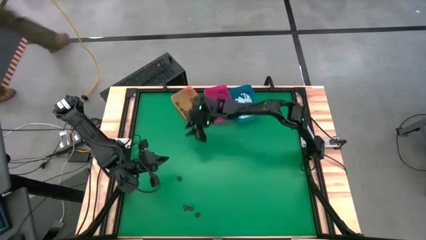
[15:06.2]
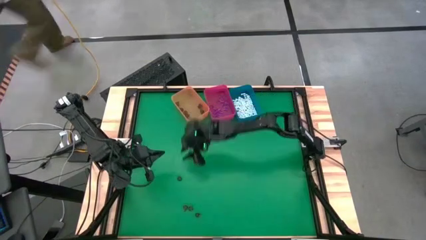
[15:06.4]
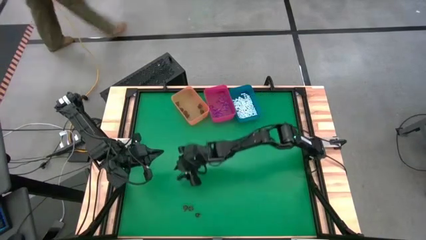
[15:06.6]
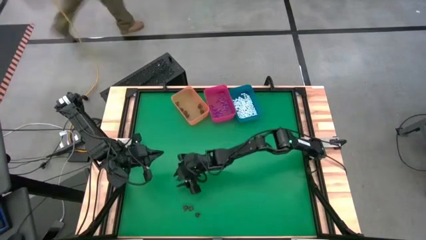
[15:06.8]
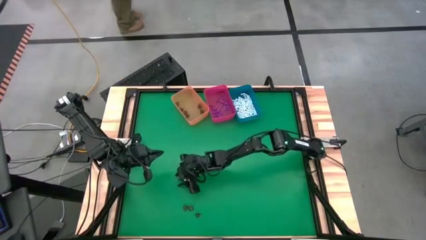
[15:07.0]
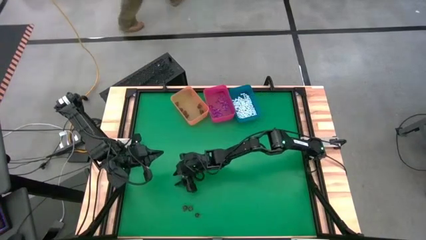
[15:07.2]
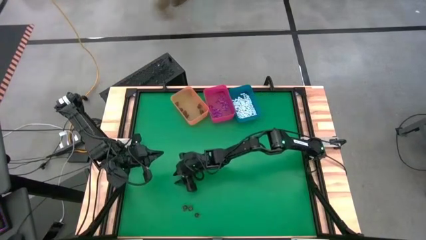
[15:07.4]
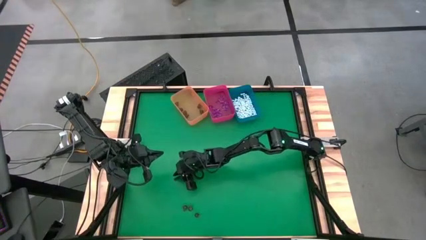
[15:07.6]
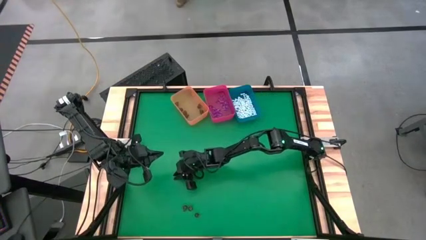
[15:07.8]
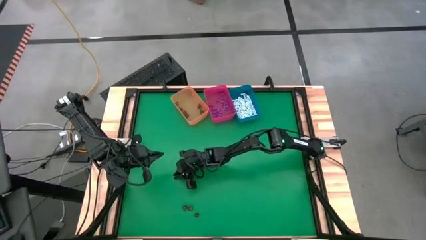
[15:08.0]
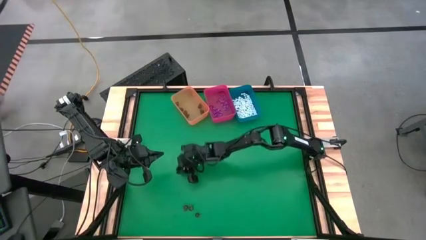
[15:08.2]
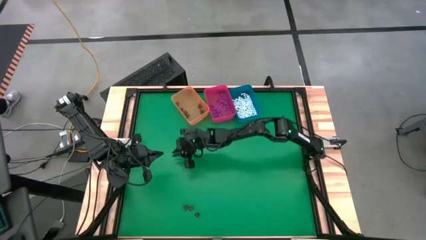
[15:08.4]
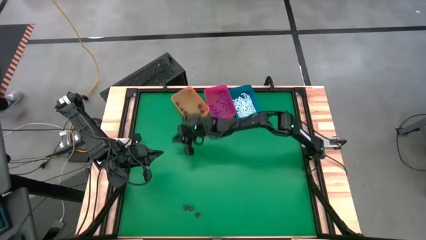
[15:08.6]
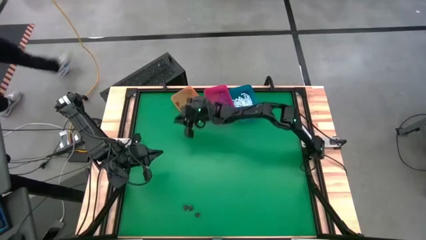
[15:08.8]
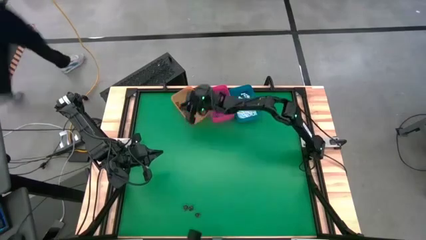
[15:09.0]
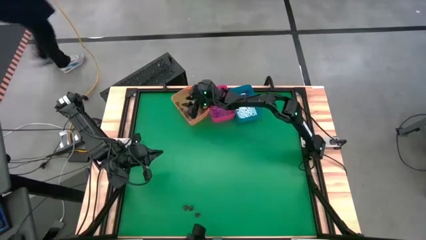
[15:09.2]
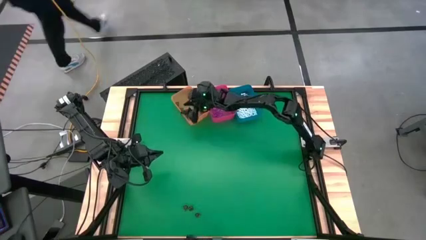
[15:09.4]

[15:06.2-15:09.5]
Task: Sort Halloween decoration
Put the top transparent black skull toy into the orange bin

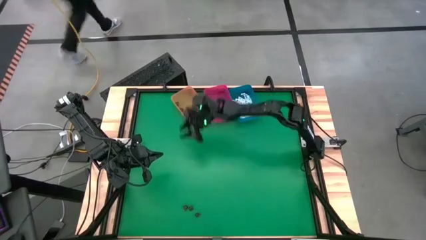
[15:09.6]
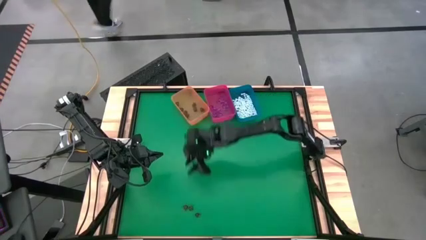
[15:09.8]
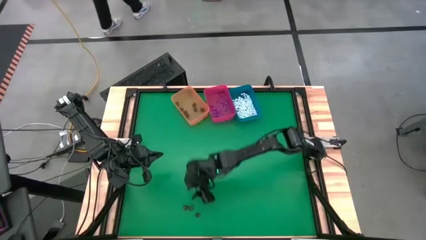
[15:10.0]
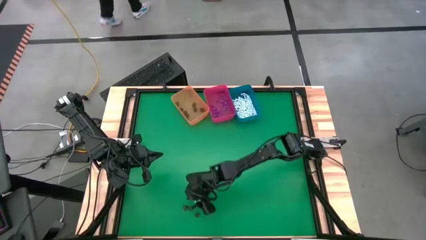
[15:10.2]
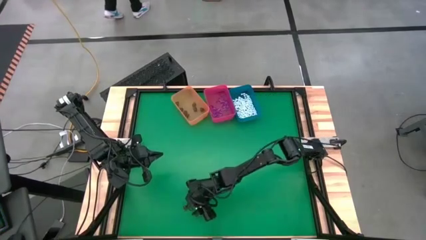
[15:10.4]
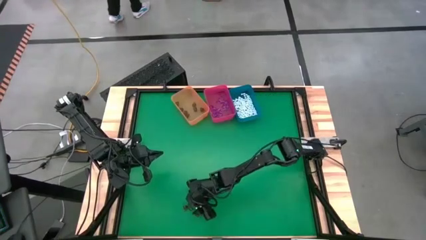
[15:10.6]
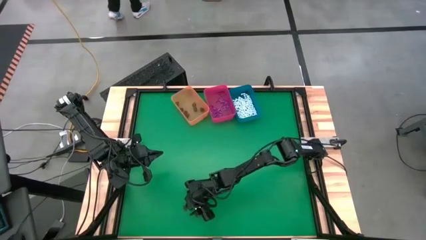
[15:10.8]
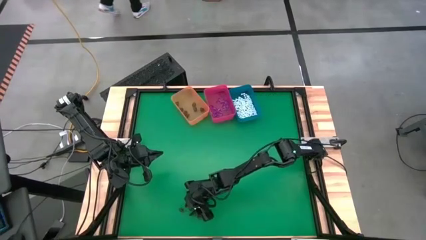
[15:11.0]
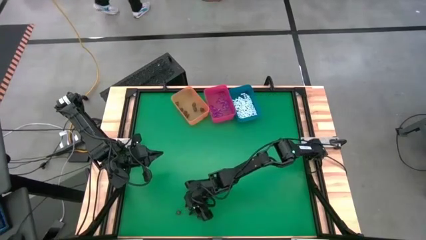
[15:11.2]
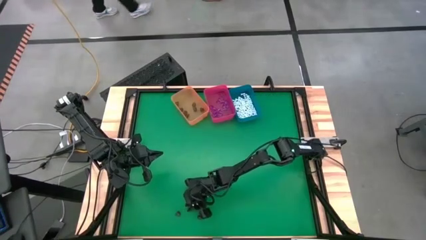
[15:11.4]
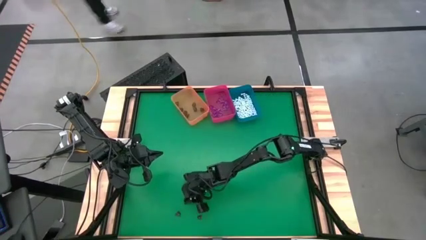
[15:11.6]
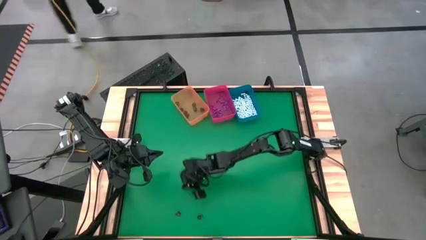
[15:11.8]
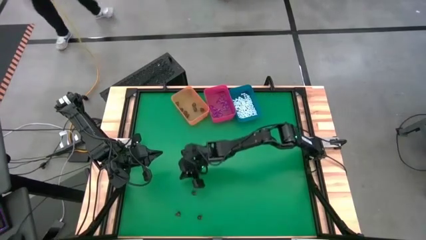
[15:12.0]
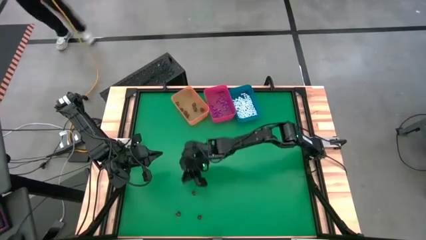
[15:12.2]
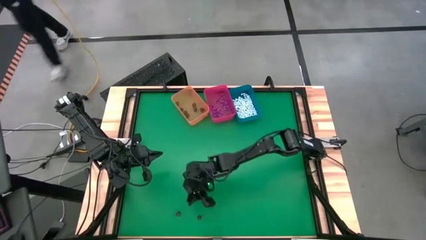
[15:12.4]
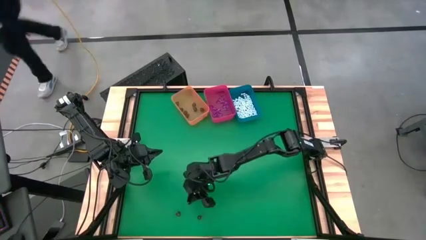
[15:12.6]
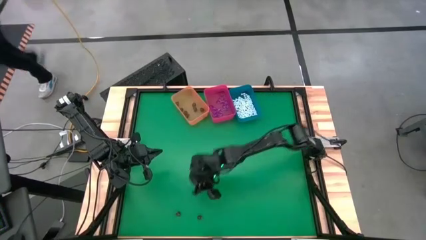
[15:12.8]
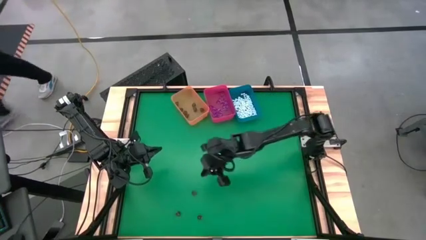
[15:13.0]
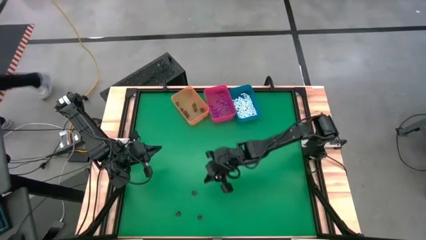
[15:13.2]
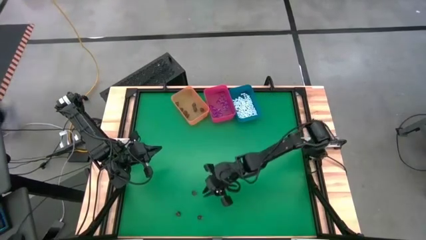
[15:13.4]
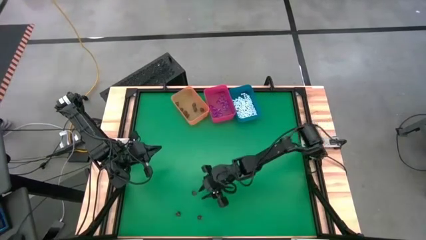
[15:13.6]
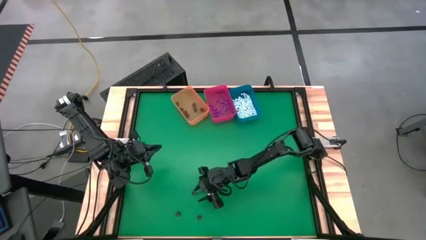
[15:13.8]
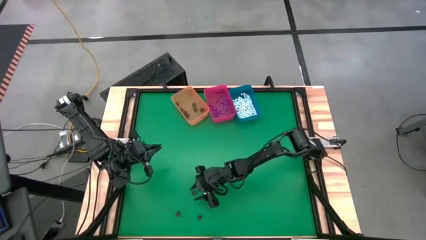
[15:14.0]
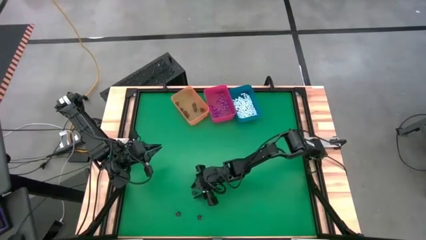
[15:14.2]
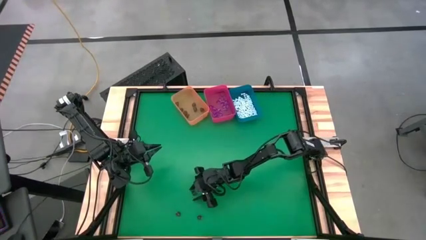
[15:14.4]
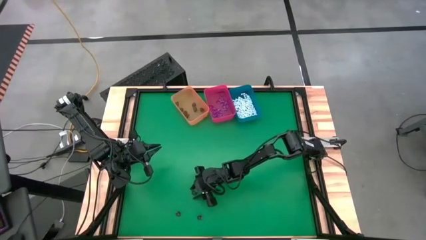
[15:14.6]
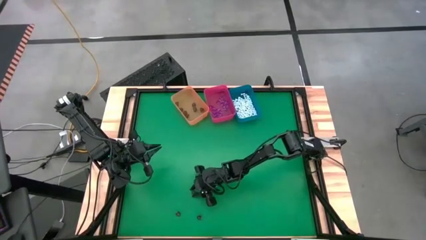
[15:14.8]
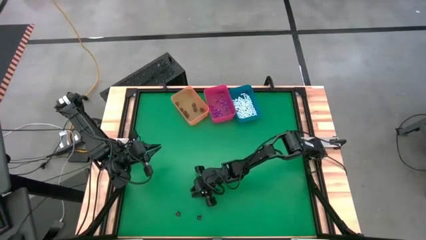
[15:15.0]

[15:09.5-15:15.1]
Put the transparent black skull toy into the orange bin

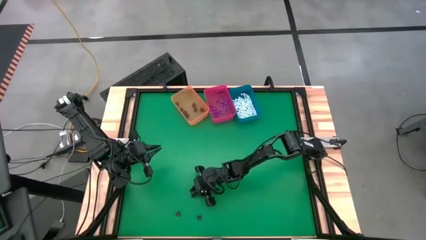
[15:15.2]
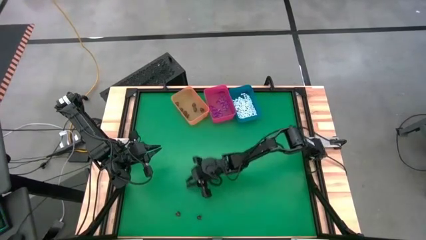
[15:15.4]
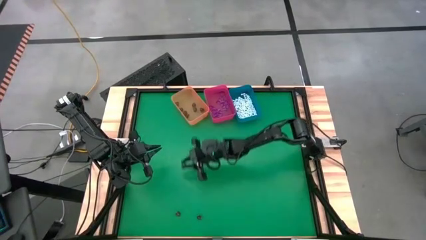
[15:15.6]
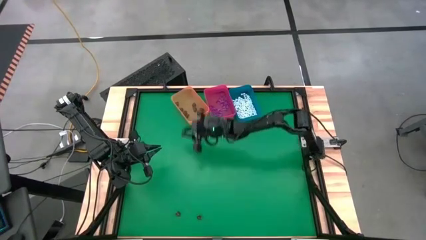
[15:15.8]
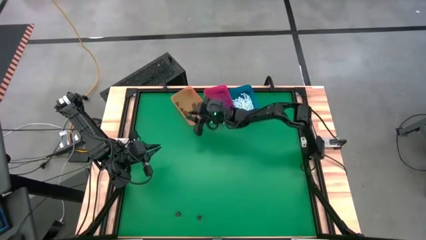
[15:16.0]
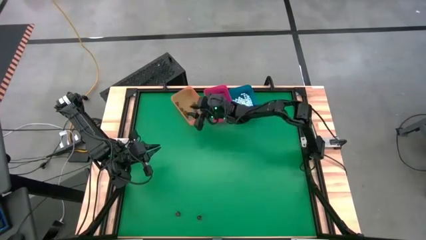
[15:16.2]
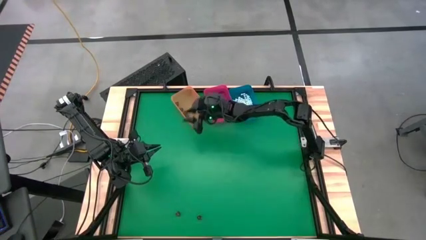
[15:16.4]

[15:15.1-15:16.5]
Put the top transparent black skull toy into the orange bin

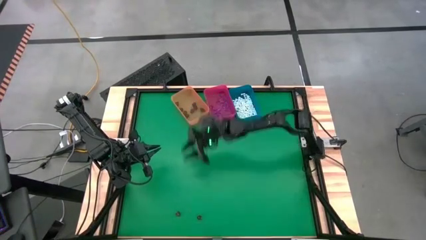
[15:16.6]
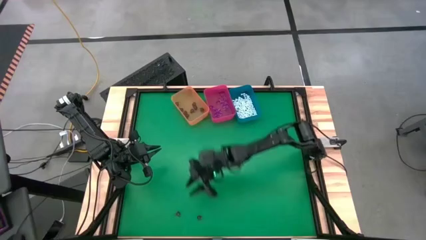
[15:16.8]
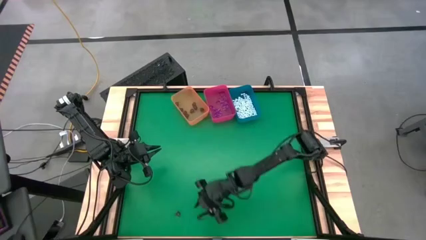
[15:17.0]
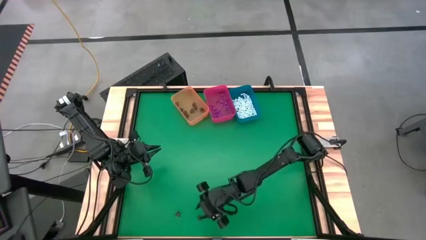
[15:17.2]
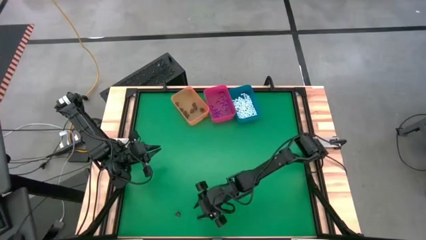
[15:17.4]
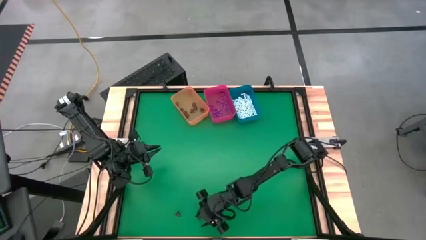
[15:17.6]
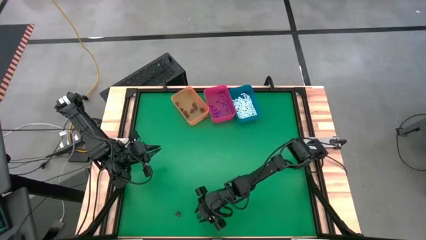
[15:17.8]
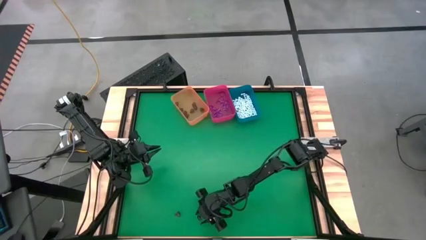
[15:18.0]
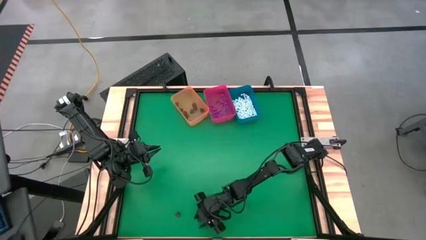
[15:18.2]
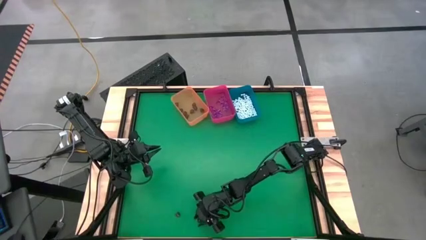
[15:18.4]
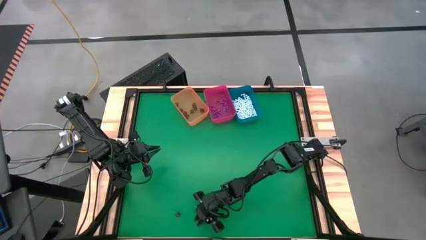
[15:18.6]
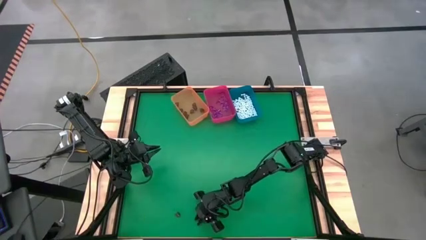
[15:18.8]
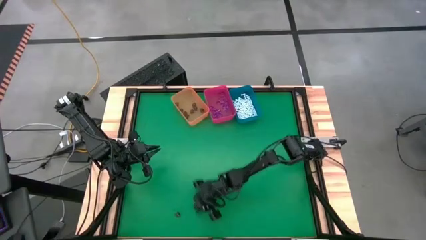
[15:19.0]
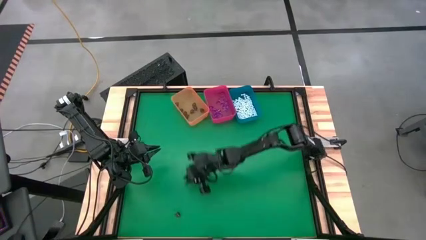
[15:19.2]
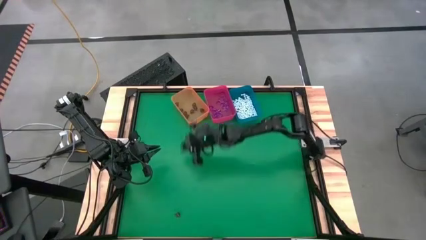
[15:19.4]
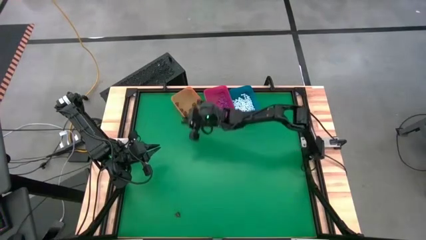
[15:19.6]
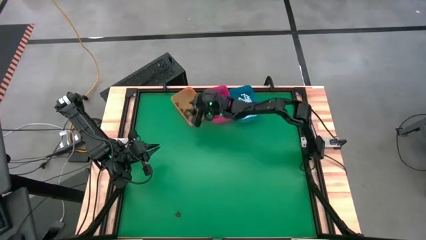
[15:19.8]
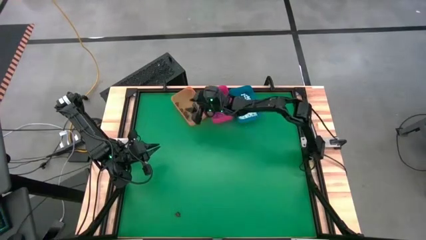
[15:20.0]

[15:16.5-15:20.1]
Put the right transparent black skull toy into the orange bin

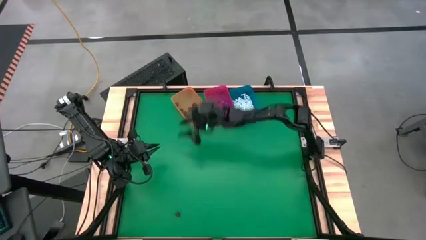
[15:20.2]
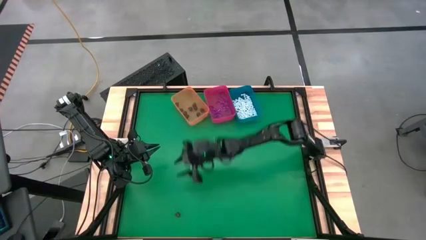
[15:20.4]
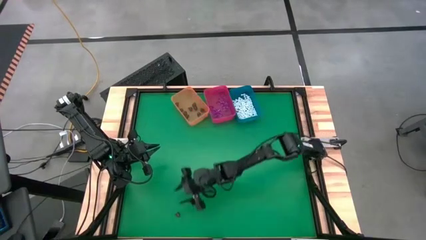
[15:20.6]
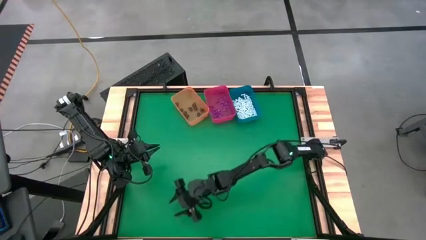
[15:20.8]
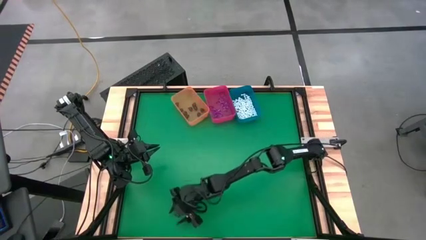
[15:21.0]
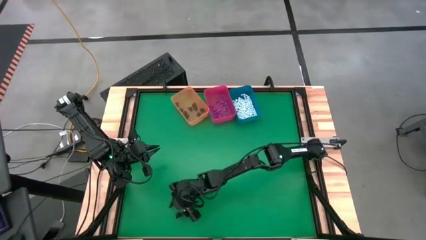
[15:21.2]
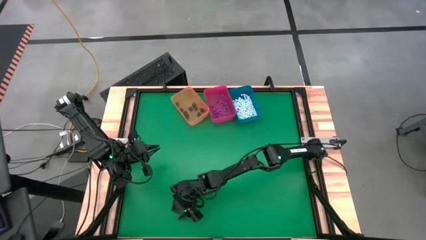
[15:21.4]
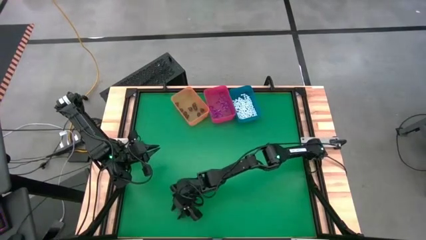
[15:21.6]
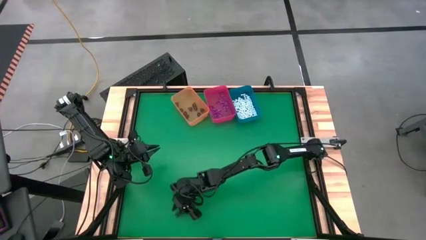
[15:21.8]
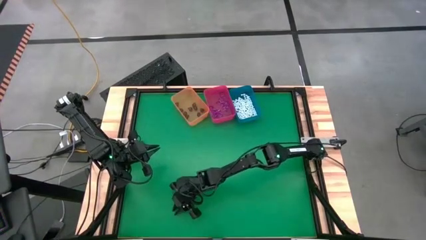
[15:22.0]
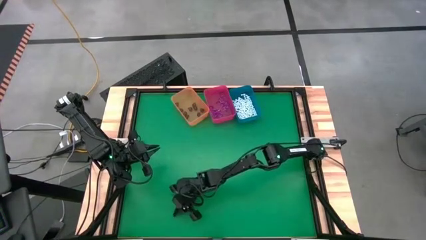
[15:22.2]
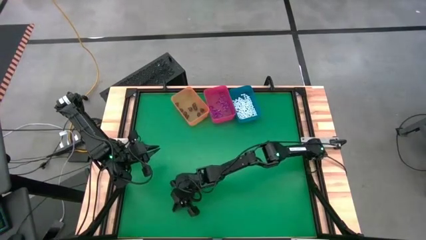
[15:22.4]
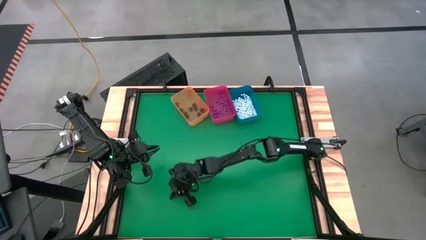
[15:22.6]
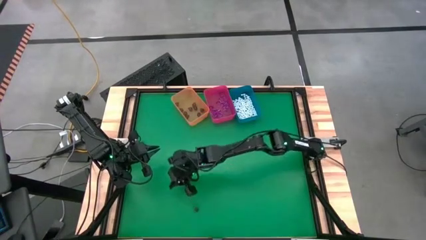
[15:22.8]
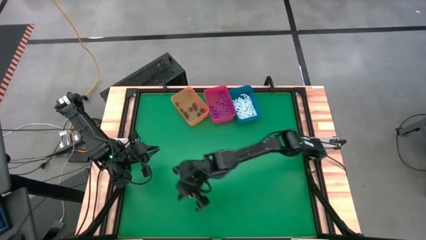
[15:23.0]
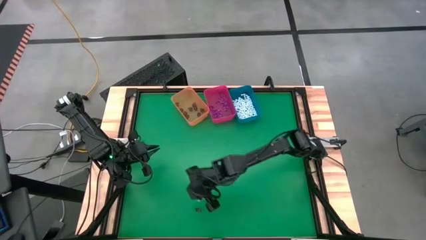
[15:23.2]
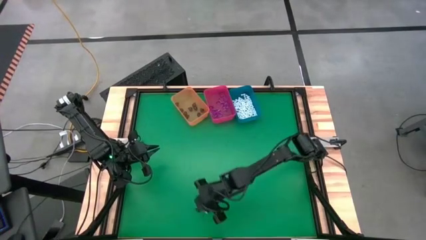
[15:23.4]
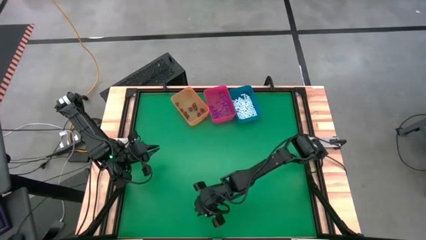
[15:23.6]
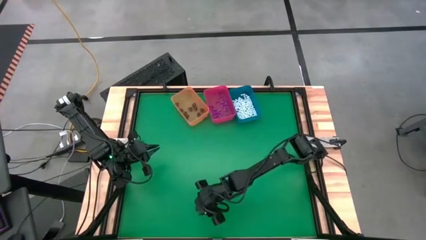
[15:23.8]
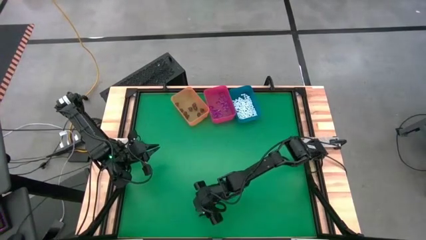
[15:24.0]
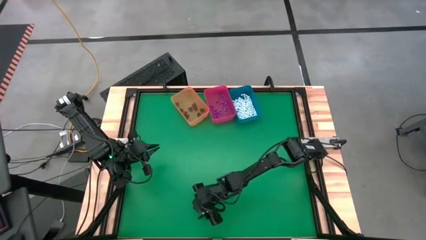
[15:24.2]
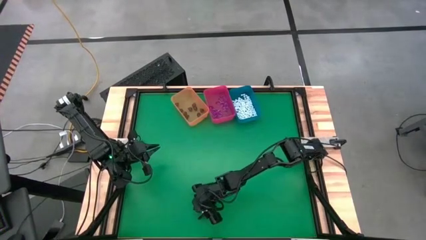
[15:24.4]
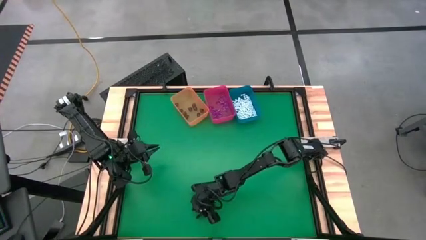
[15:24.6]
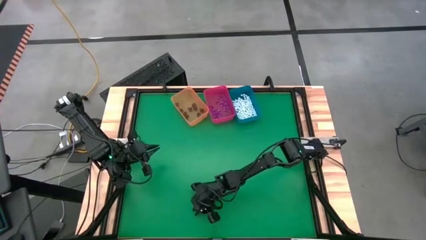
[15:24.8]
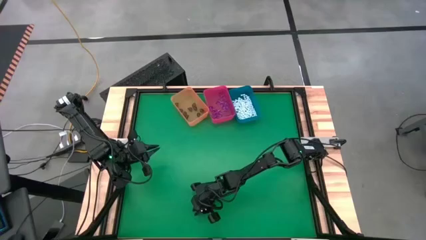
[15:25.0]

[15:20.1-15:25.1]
Put the transparent black skull toy into the orange bin
